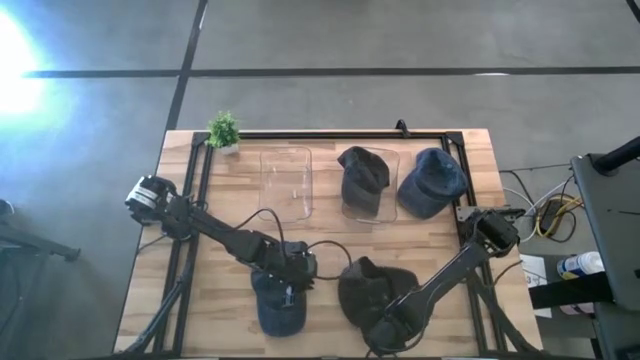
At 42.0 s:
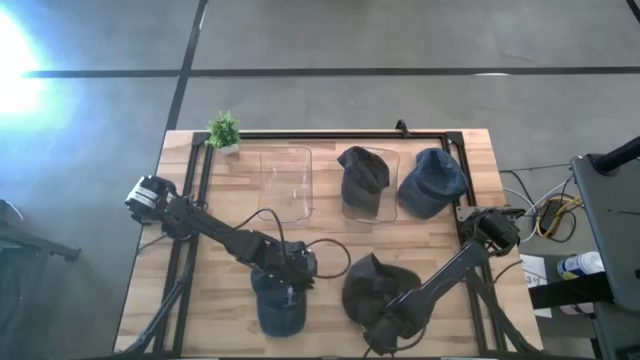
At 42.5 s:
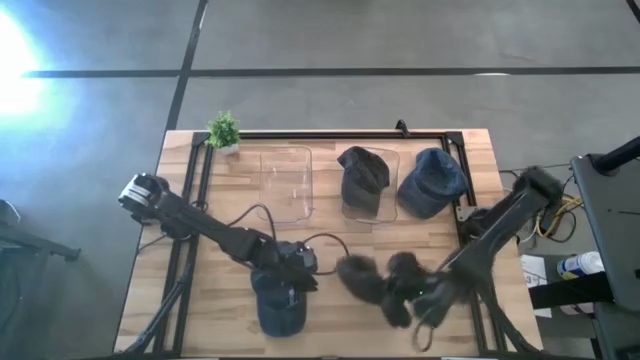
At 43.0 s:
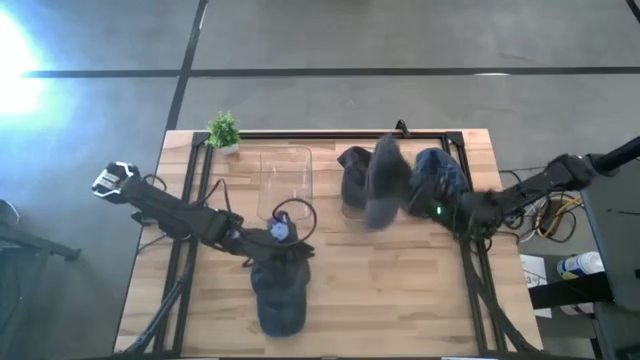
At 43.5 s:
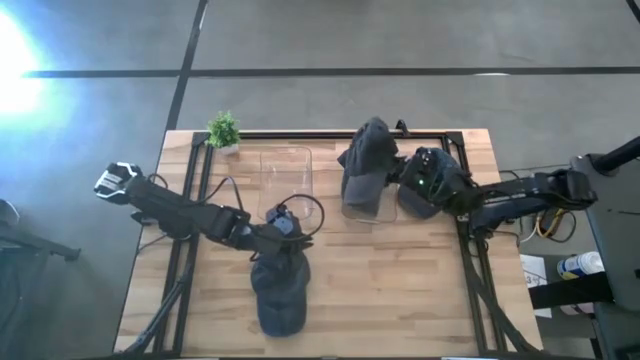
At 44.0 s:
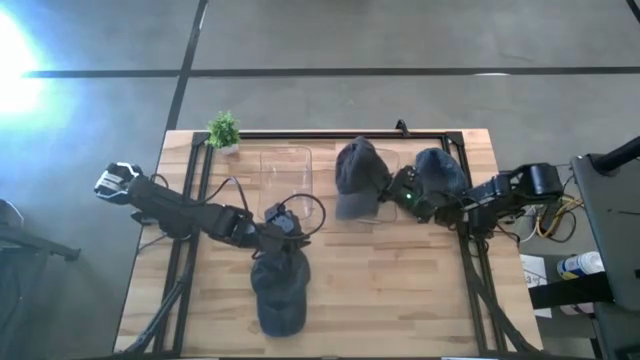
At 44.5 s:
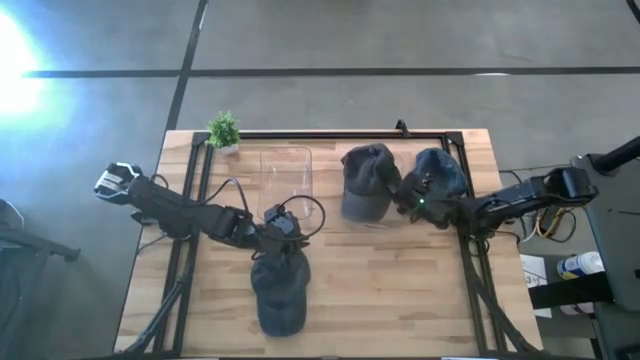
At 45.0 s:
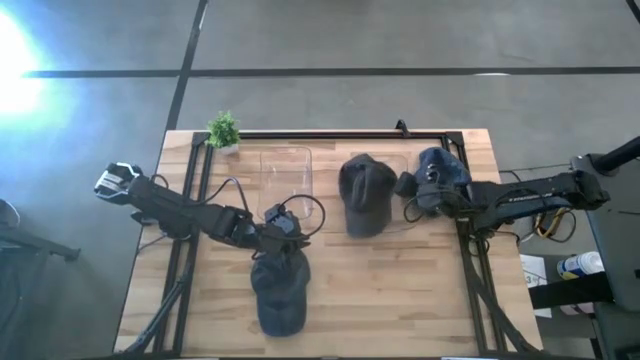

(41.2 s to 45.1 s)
Task: Pick & Place hat
Put the gray cap into the right transparent bin

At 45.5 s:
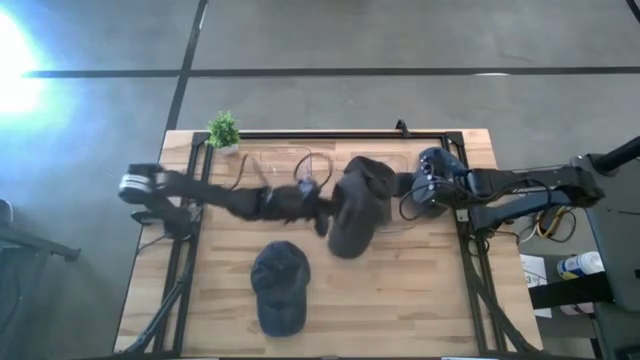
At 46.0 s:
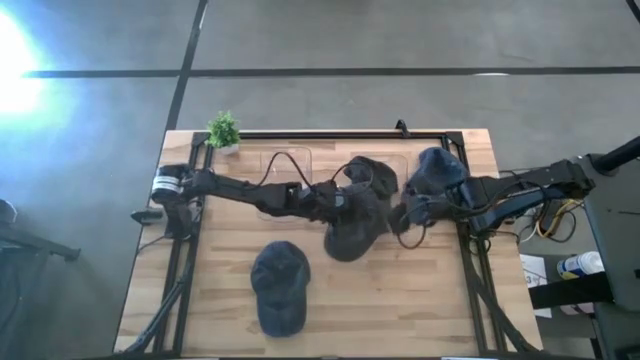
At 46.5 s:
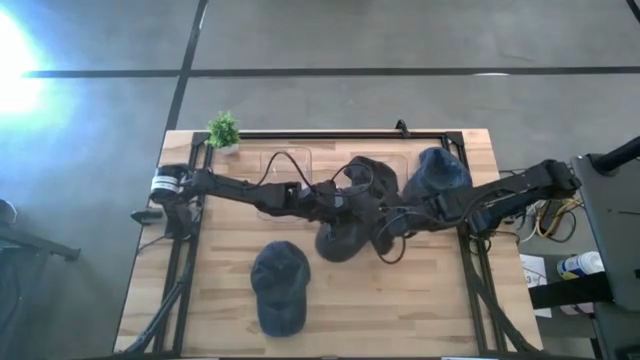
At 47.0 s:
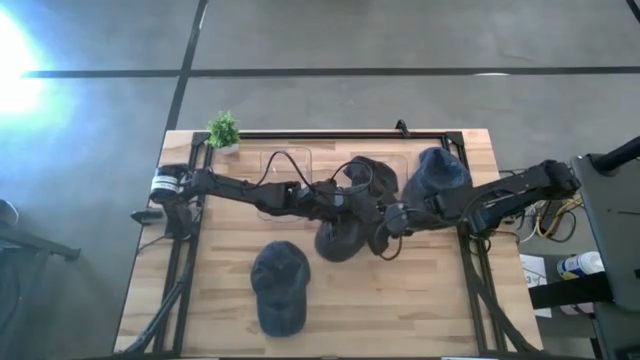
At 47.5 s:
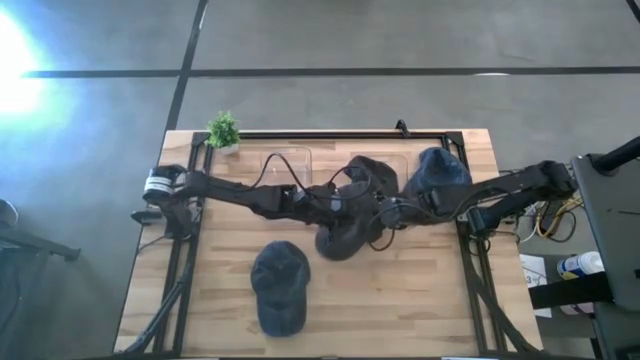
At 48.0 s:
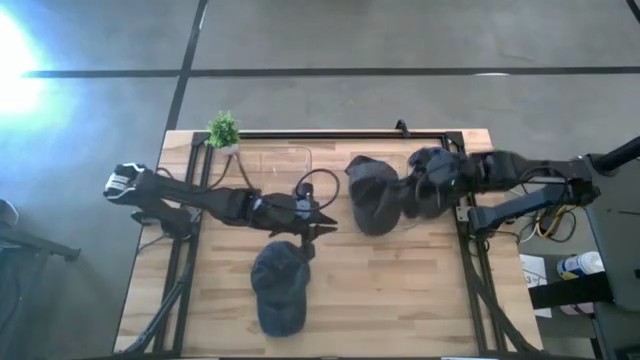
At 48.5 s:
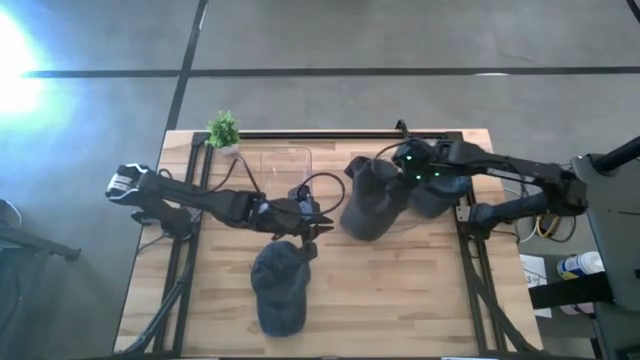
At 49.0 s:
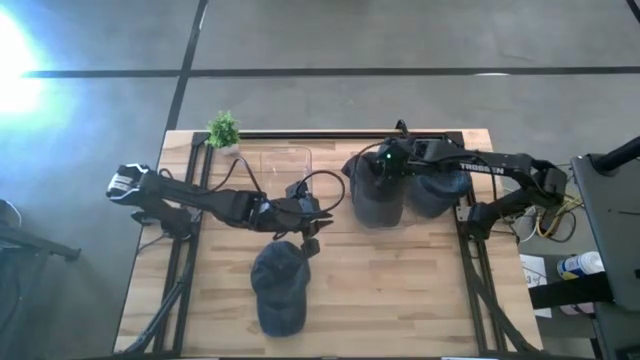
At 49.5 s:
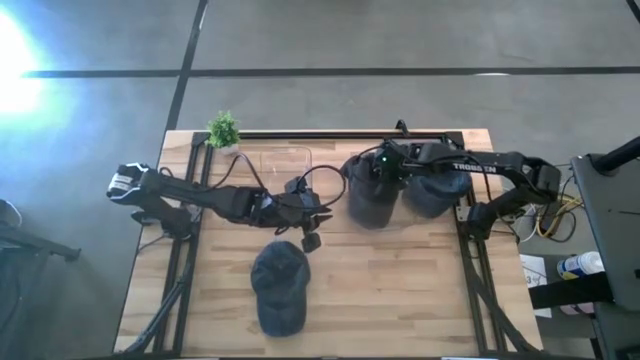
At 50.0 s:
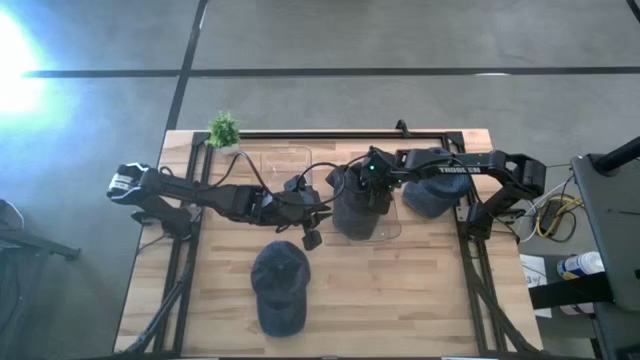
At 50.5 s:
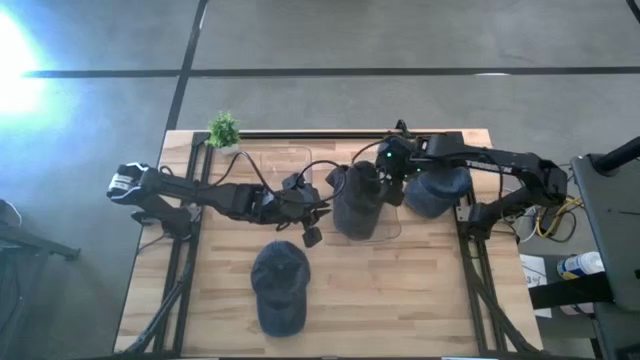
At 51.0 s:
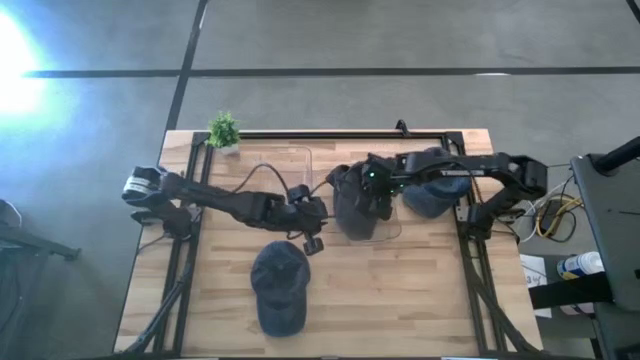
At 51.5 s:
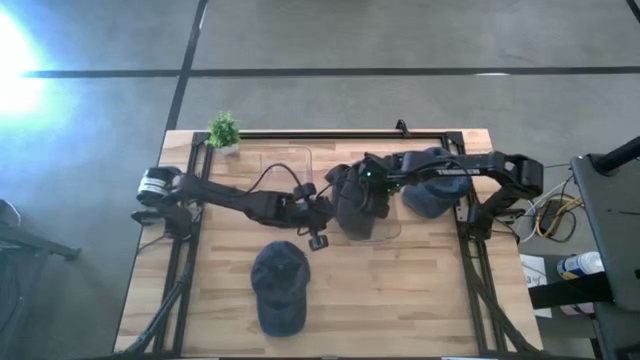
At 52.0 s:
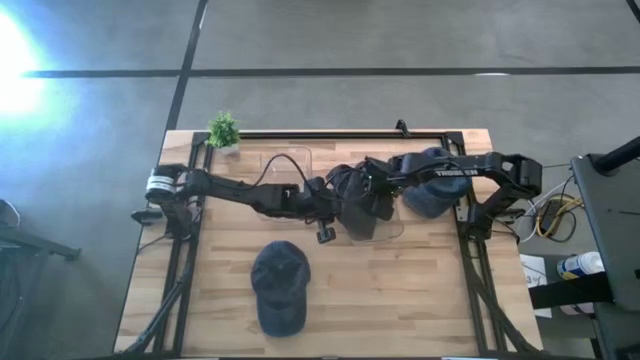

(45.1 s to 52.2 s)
Put the gray cap into the right transparent bin

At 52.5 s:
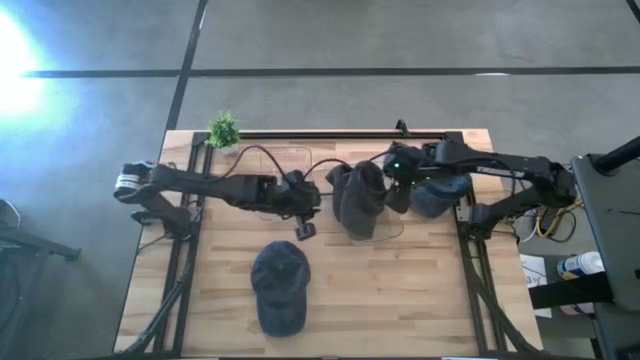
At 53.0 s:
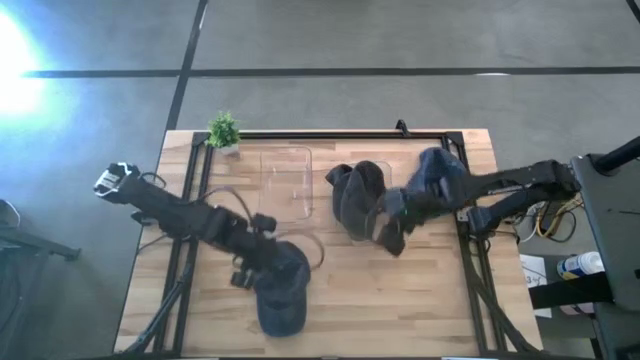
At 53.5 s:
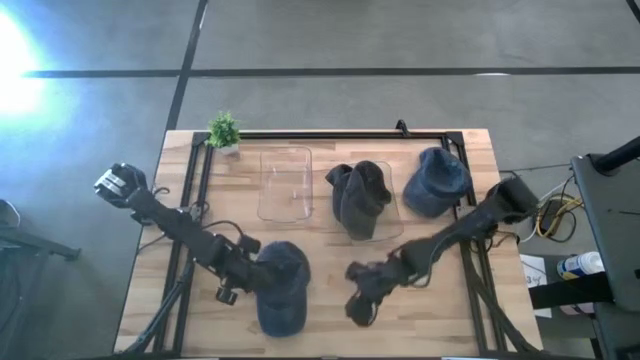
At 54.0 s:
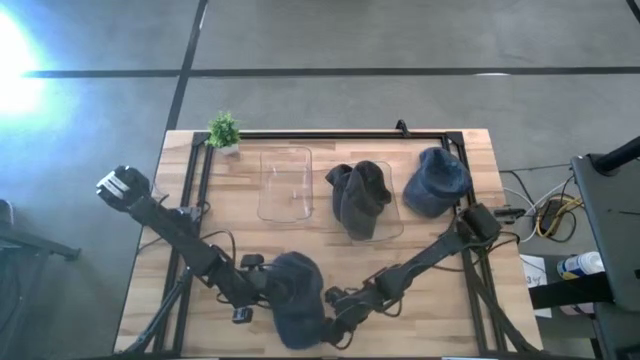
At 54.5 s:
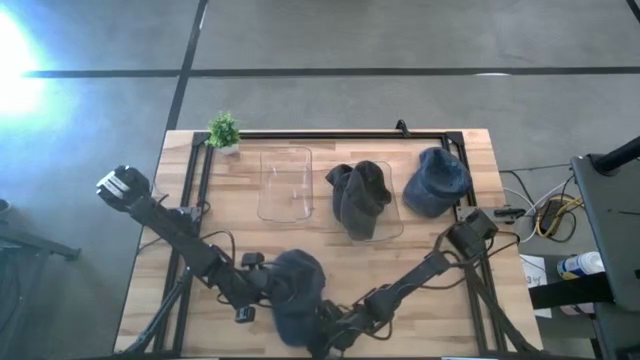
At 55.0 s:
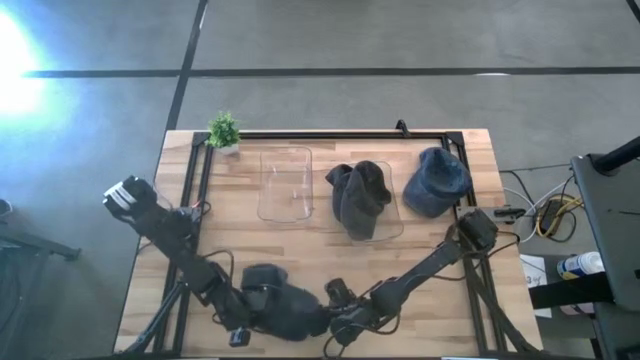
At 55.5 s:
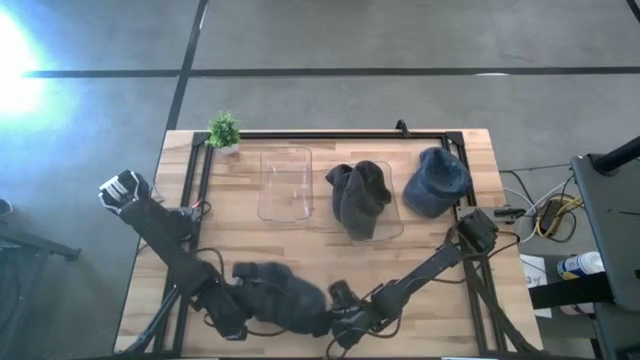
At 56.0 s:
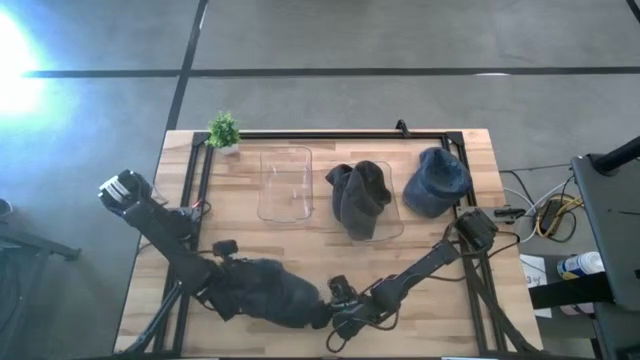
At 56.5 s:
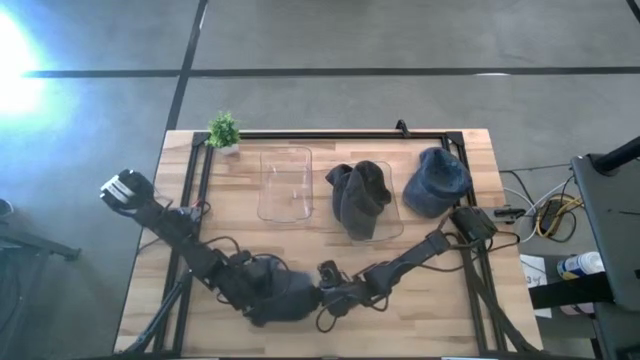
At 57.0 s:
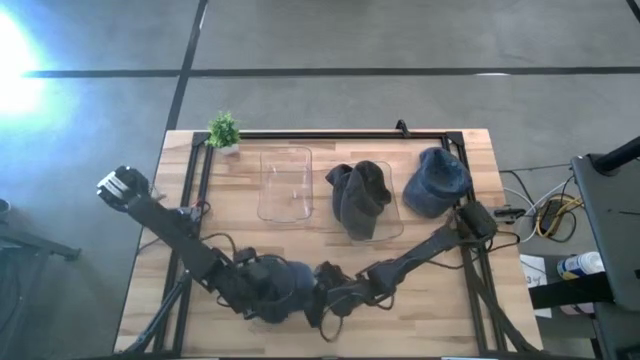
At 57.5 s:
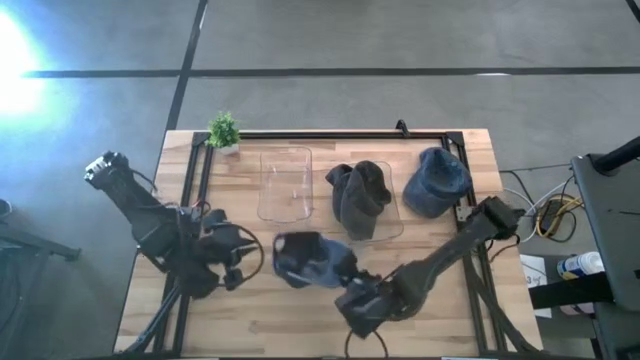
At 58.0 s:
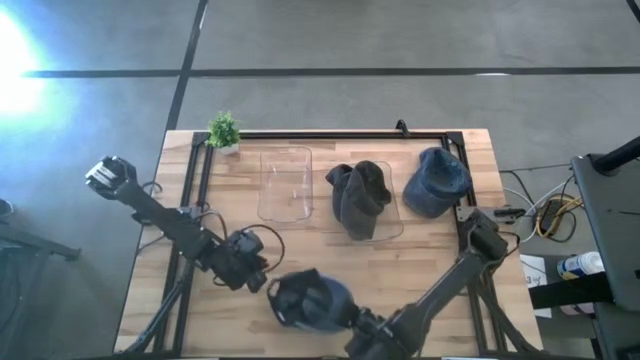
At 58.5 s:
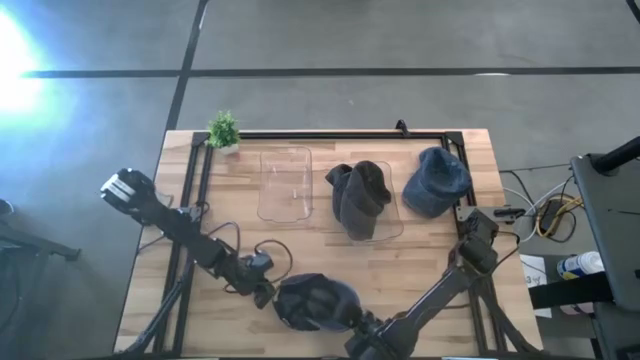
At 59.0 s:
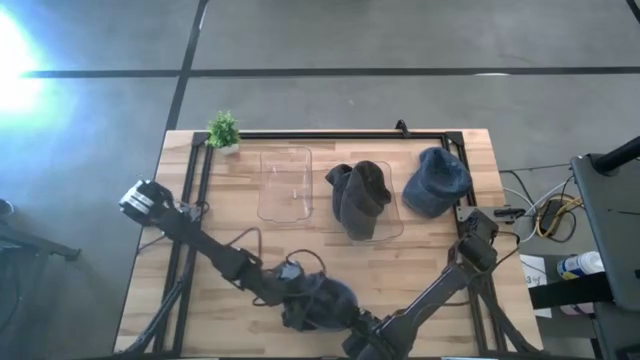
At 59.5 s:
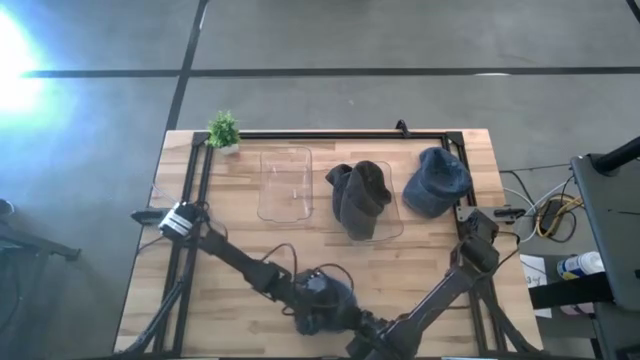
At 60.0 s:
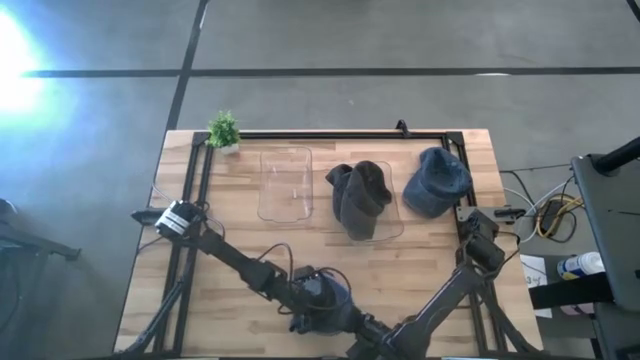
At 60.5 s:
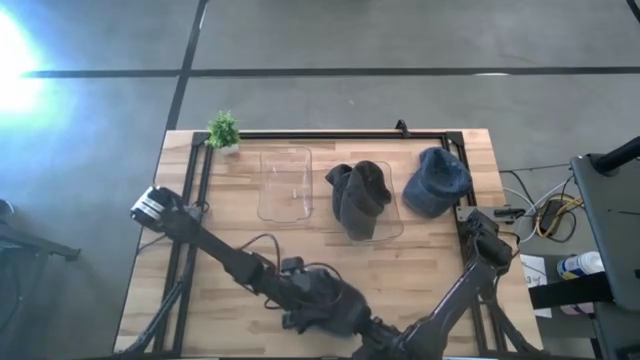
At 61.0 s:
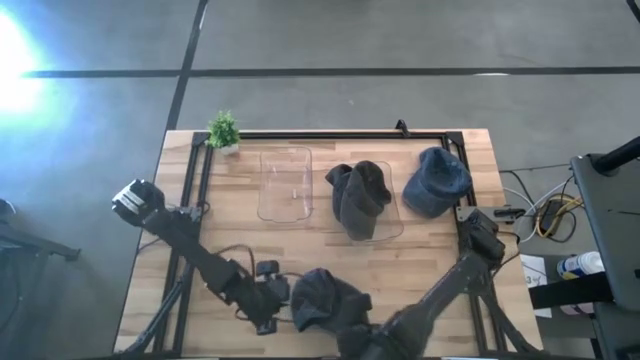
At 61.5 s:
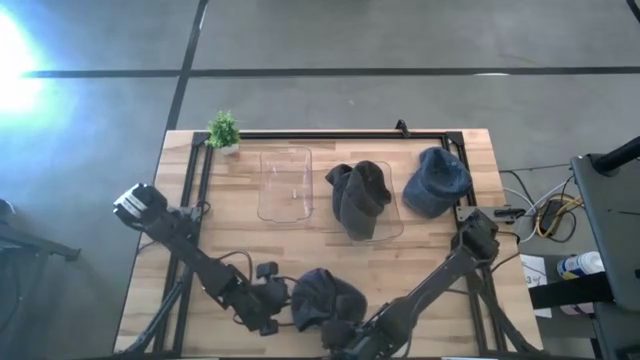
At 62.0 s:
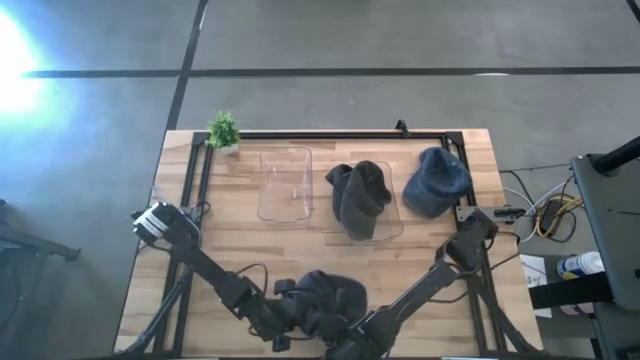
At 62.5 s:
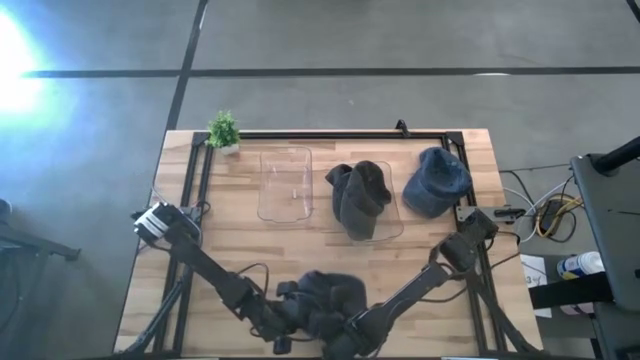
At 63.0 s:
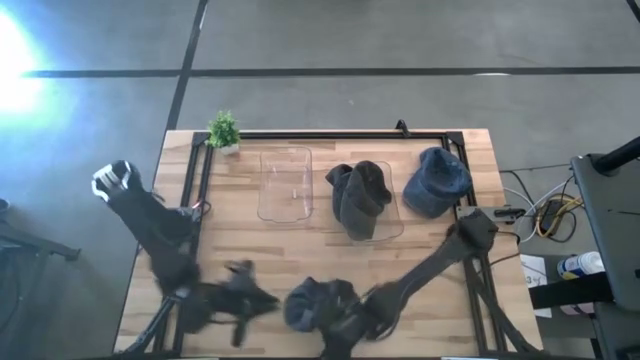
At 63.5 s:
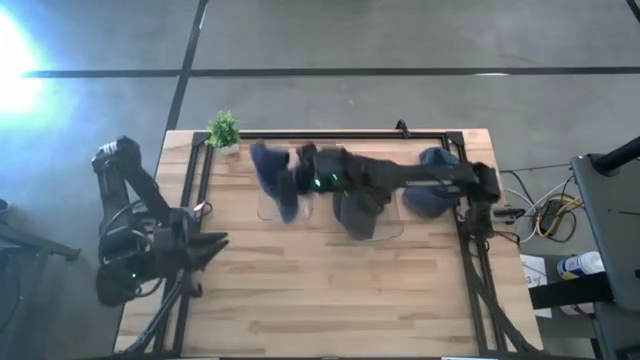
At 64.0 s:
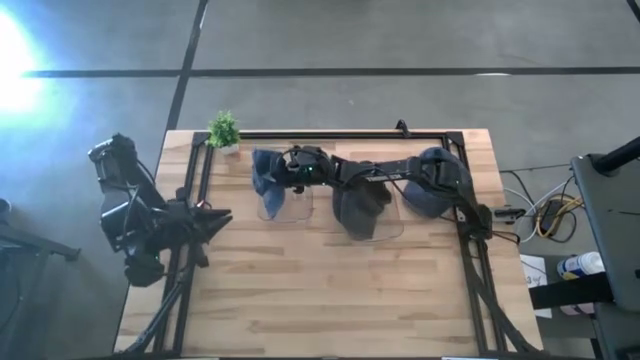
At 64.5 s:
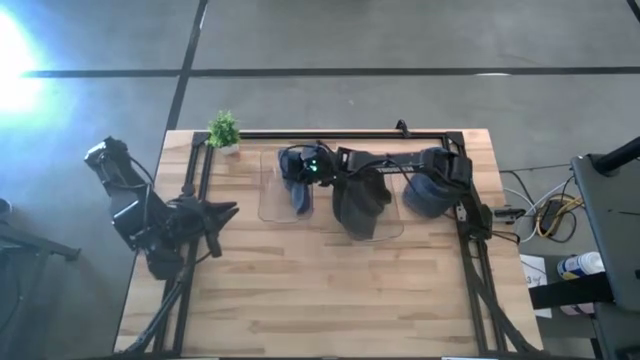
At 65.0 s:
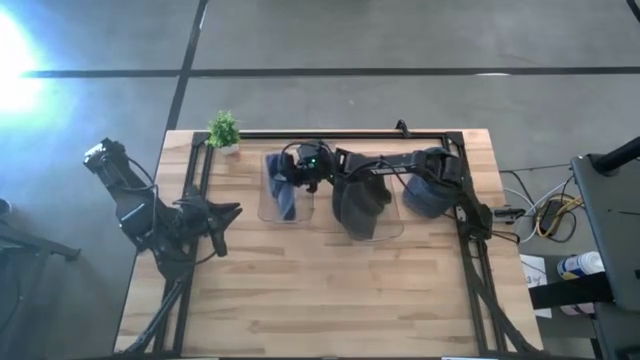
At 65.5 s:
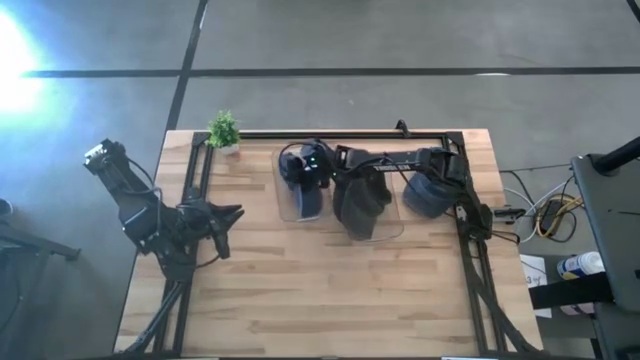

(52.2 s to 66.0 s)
Put the bottom blue cap into the left transparent bin
